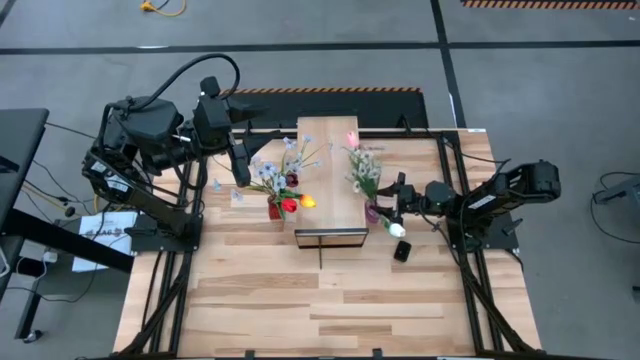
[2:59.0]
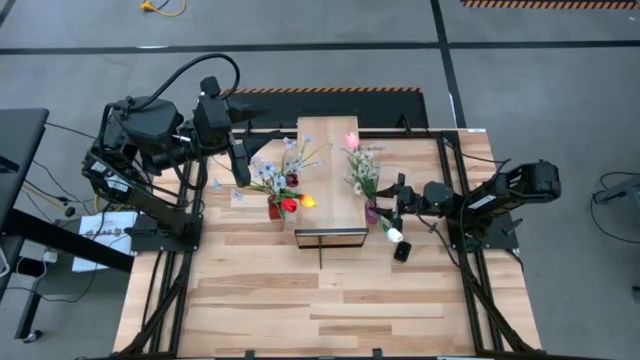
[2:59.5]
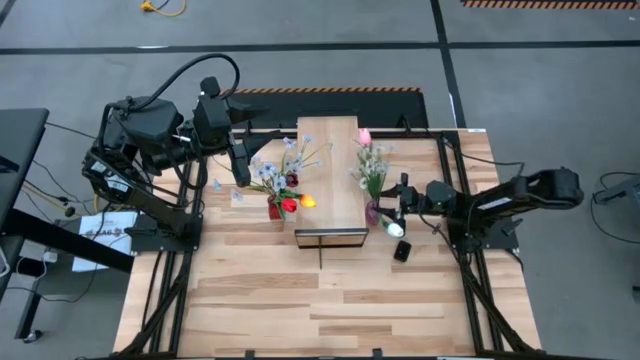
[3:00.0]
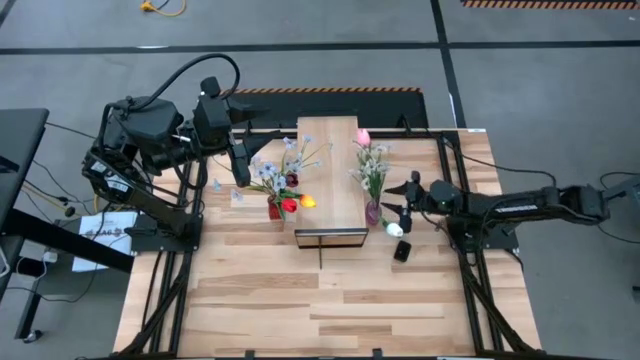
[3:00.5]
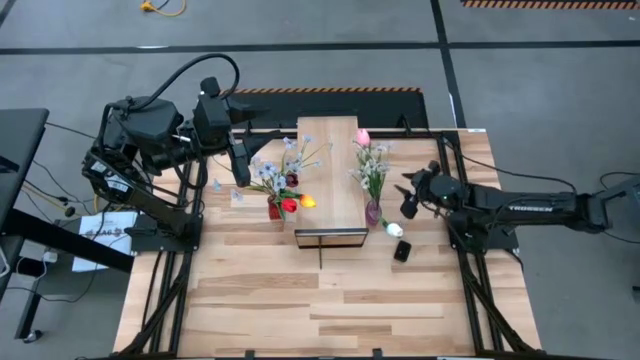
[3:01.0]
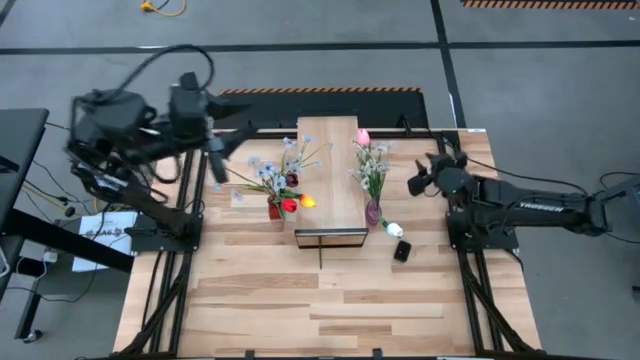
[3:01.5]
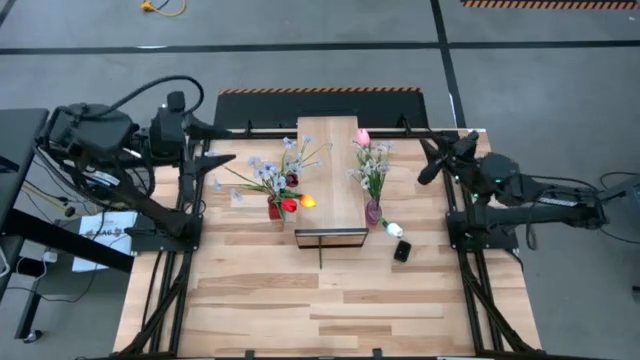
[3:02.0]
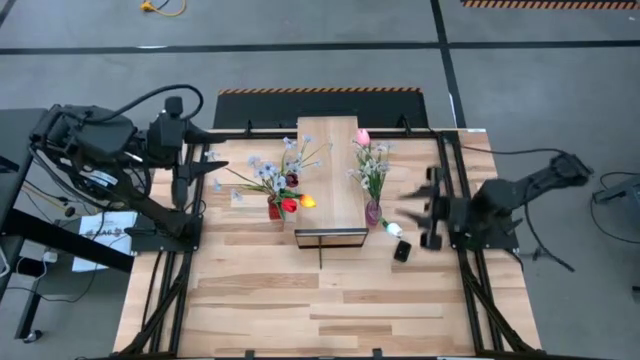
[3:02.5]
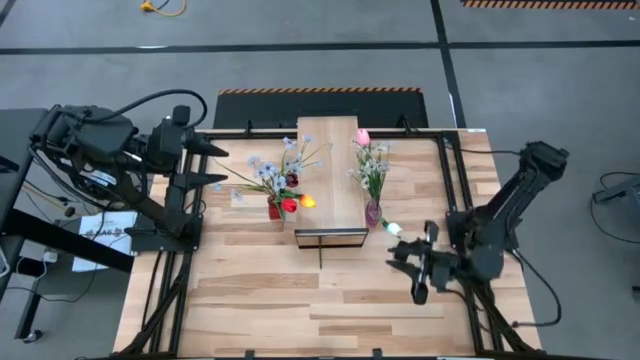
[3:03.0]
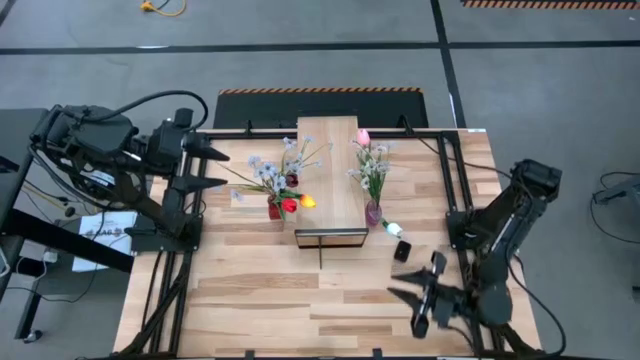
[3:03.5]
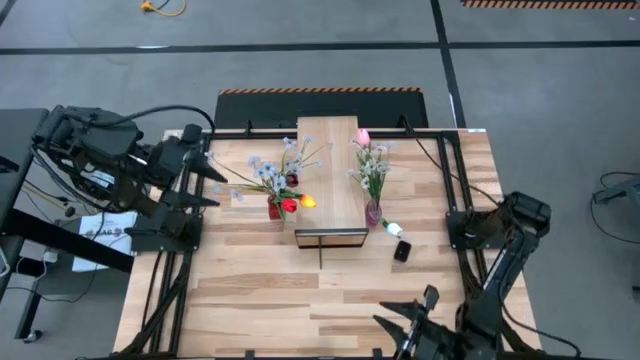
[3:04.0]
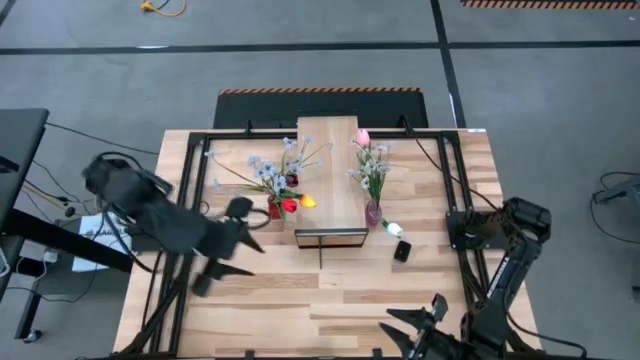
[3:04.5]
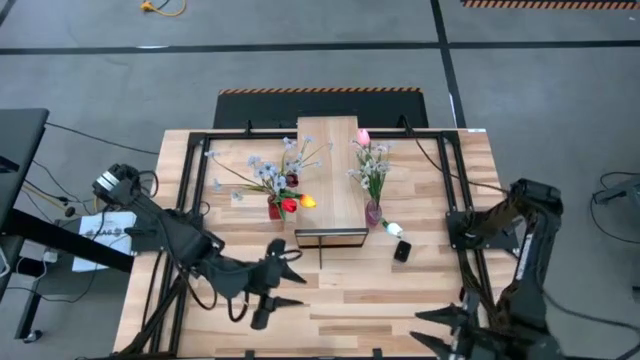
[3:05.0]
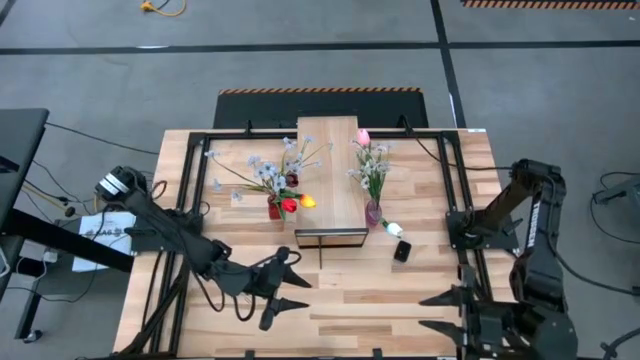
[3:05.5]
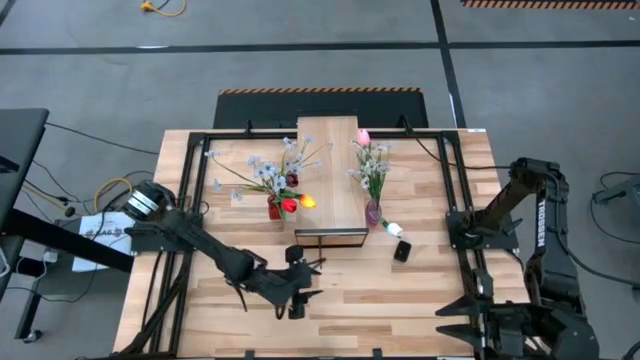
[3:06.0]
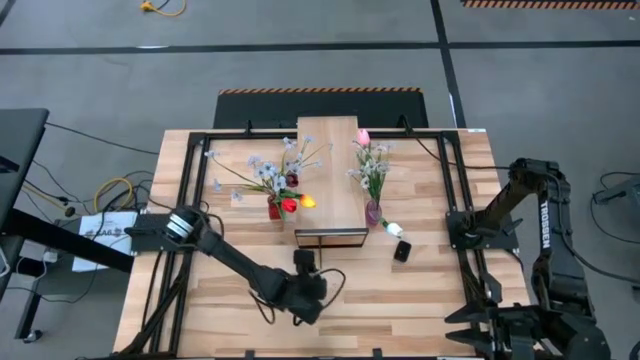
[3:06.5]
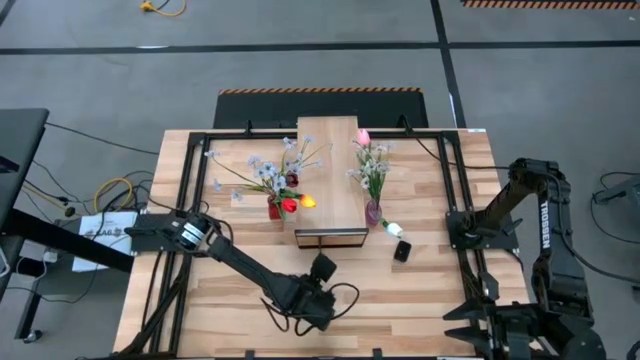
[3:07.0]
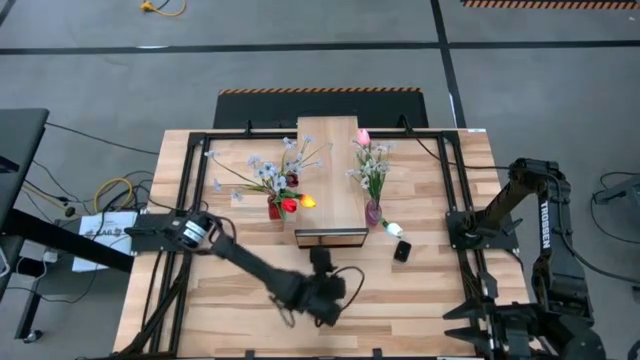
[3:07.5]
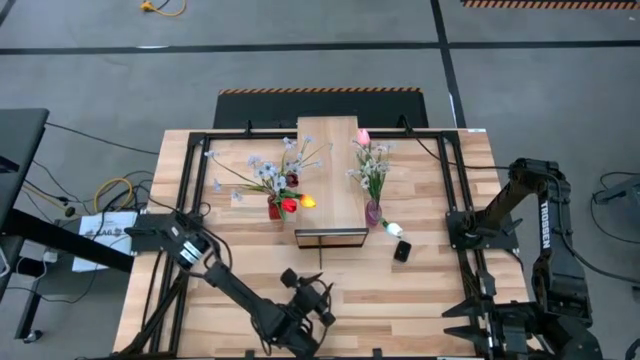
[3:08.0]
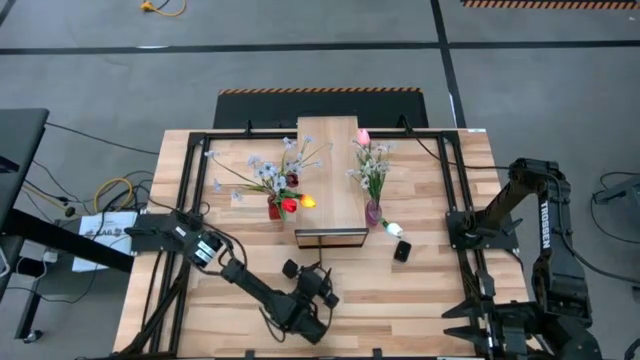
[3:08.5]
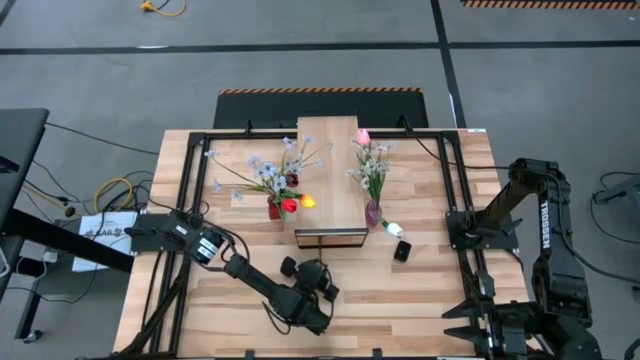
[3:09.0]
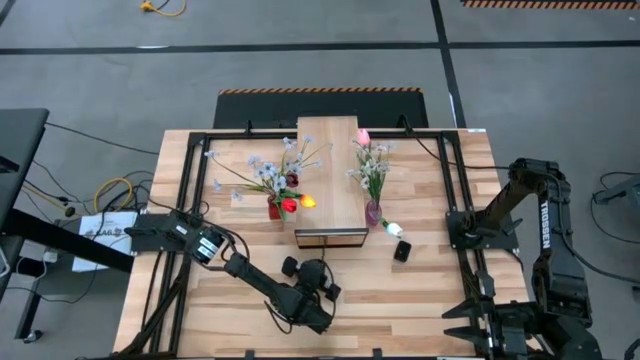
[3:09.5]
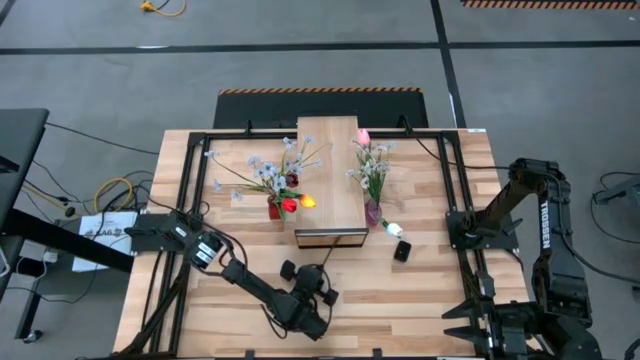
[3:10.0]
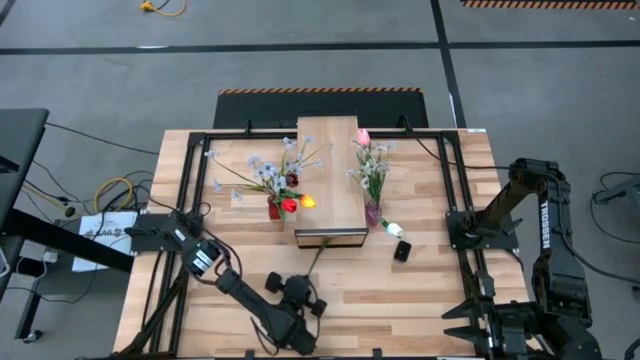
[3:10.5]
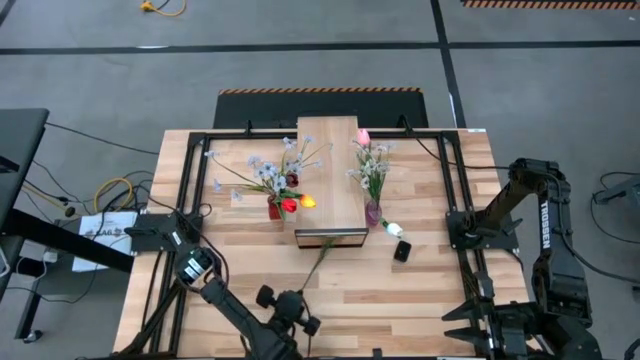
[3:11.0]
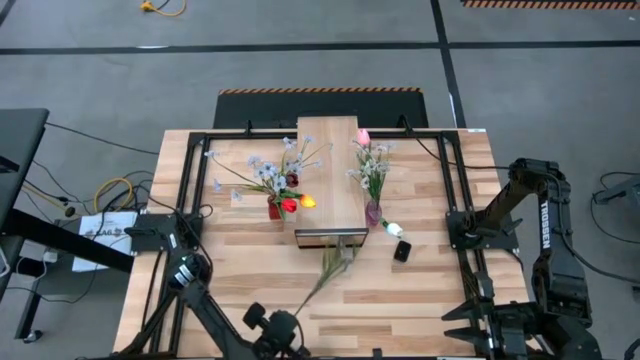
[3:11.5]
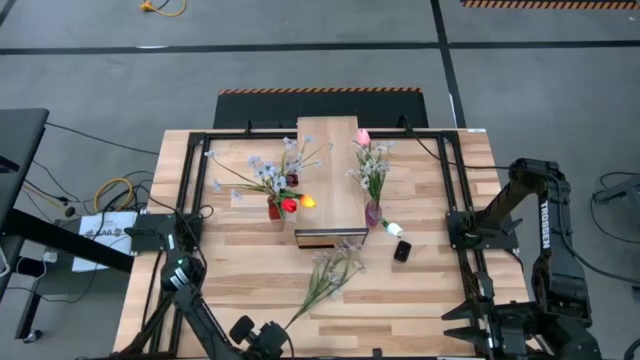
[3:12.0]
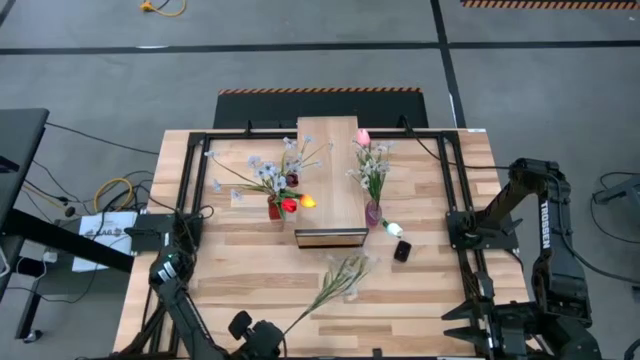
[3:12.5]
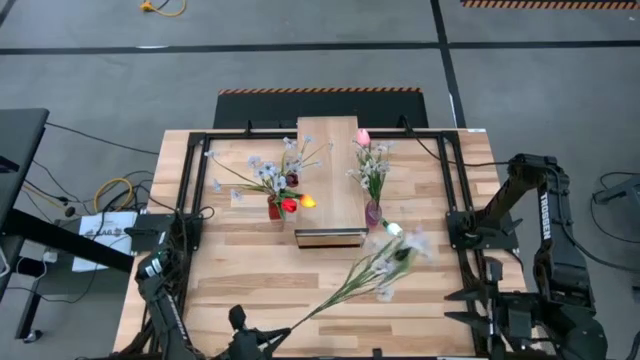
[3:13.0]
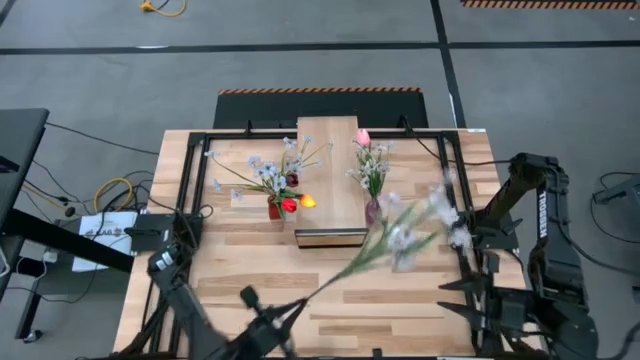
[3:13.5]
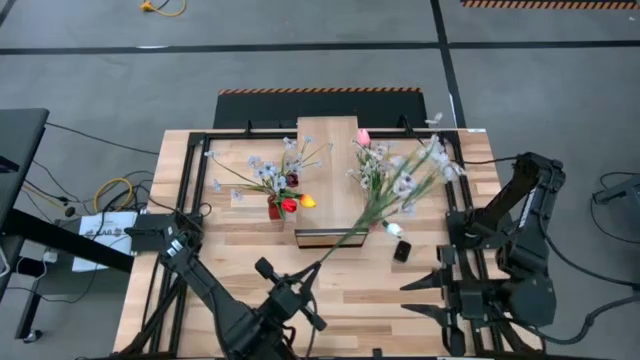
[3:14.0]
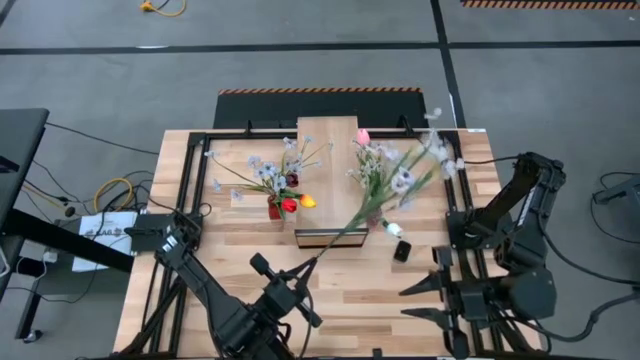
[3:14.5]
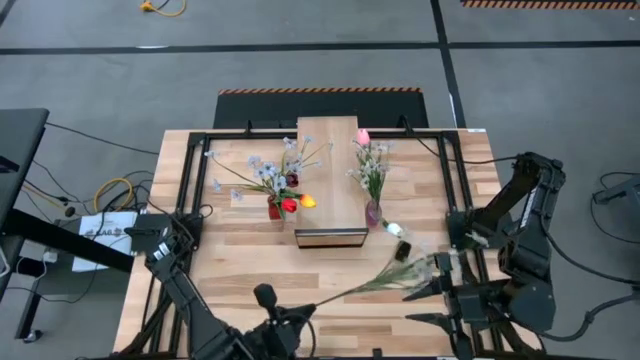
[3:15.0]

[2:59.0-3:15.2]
Task: Pick and place flowers into a vace then onto a shelf
Put the white flowers into the purple flower vase

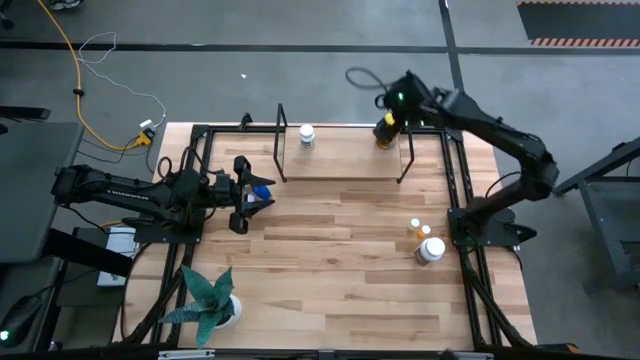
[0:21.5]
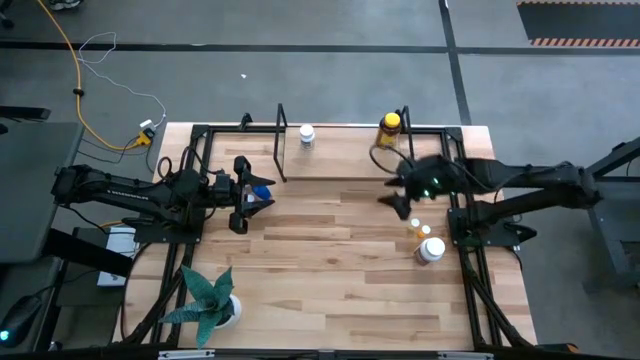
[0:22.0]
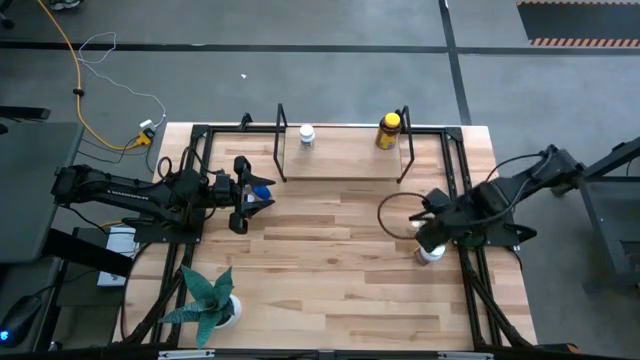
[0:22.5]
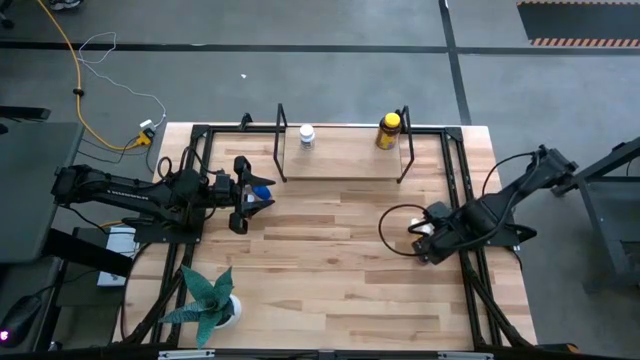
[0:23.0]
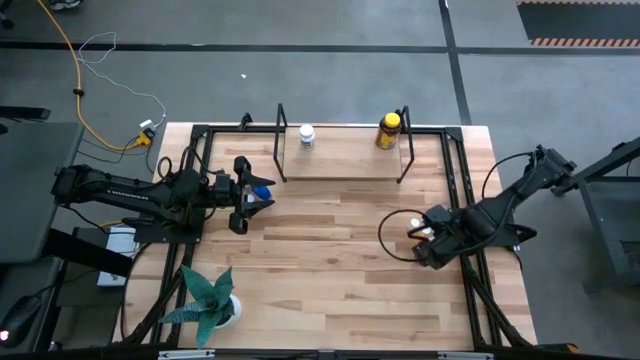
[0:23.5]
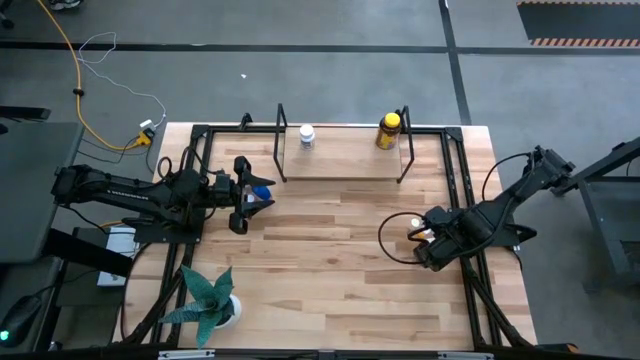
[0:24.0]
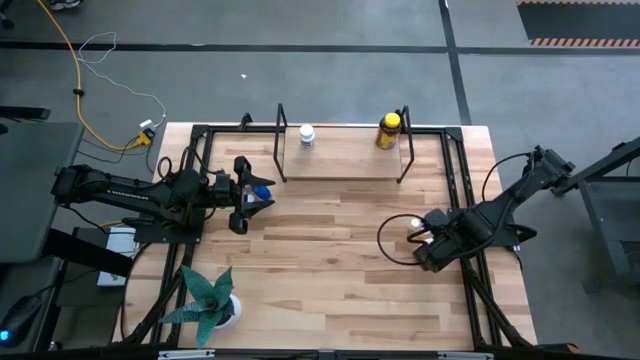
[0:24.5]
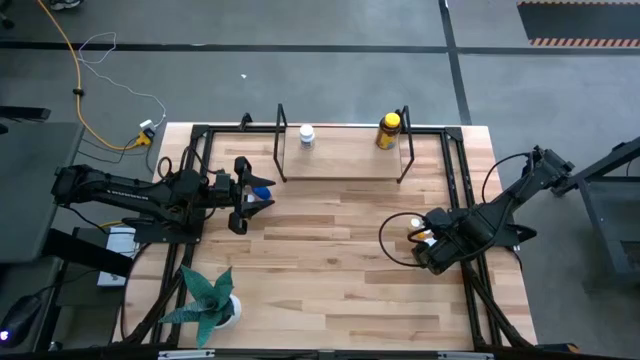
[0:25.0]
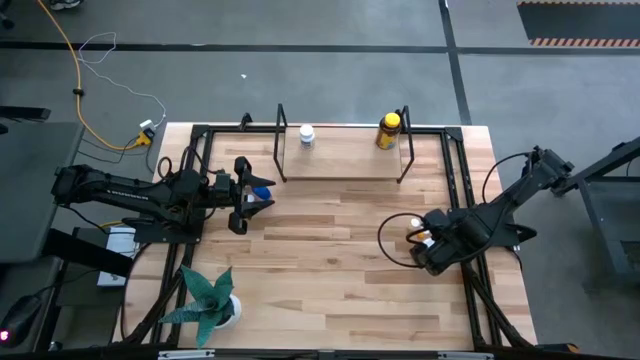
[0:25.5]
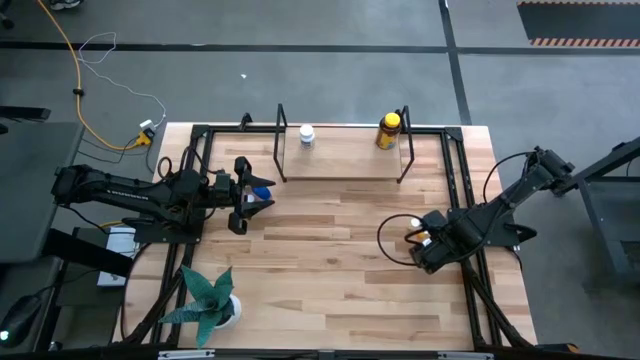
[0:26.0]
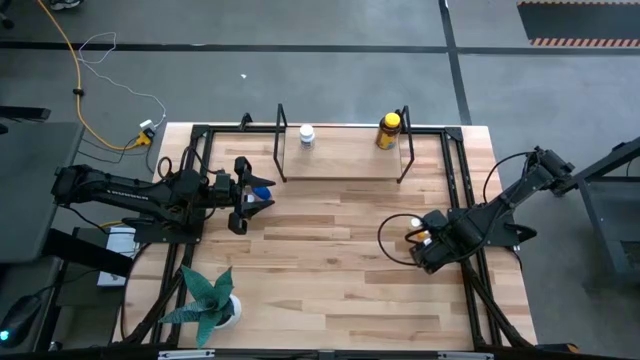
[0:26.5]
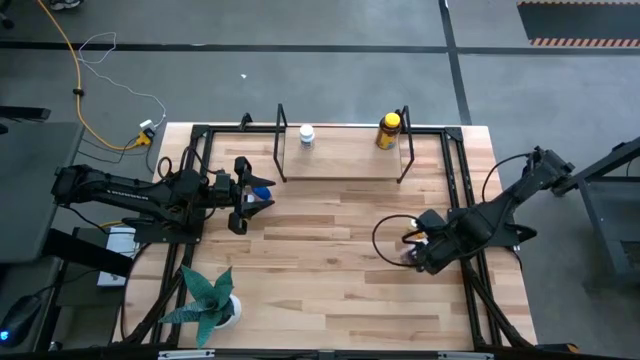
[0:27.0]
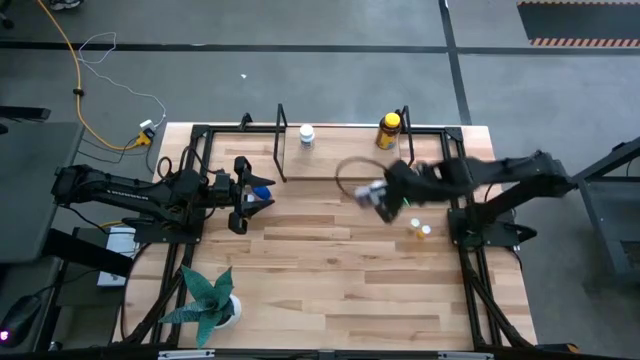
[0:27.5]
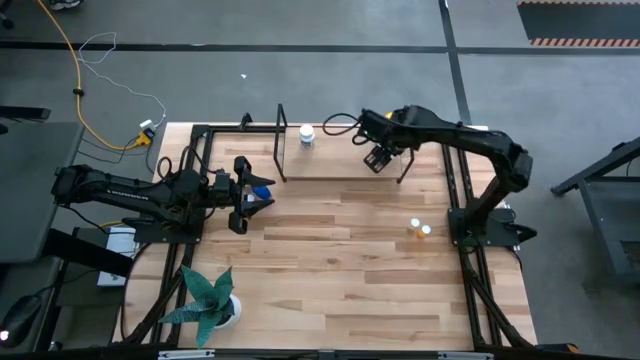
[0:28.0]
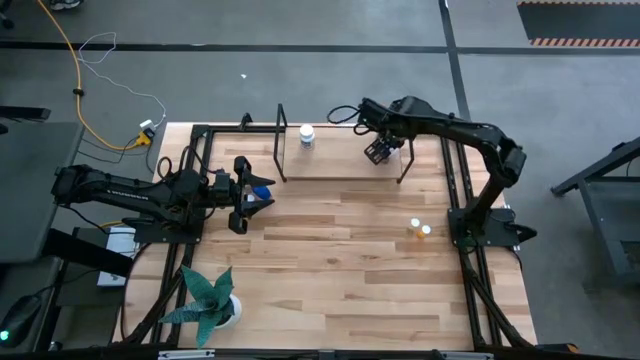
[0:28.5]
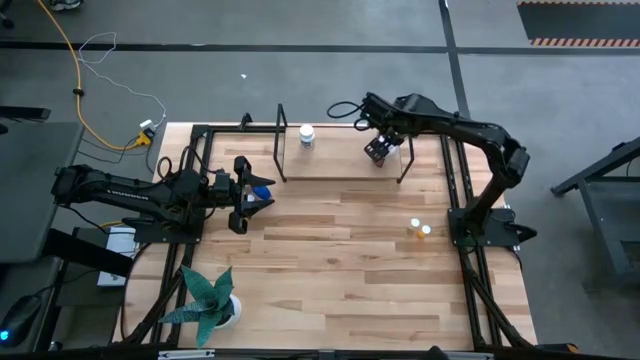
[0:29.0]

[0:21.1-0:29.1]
Task: Pick and place medicine bottles onto shelf by color
Put the large purple pill bottle on the shelf
